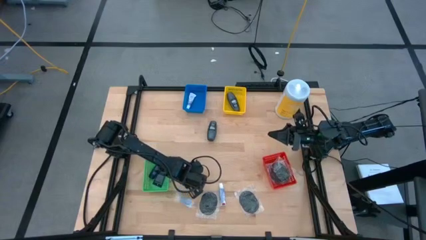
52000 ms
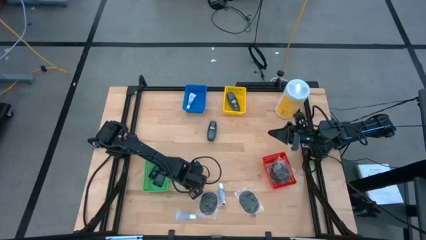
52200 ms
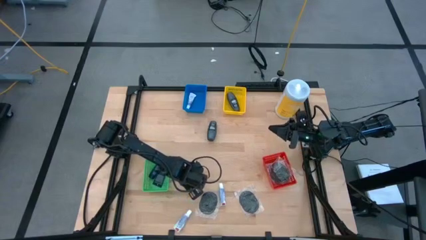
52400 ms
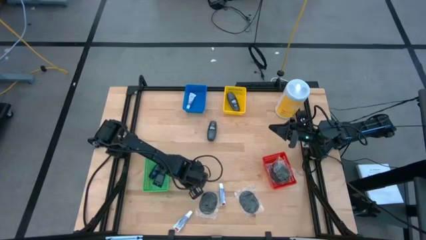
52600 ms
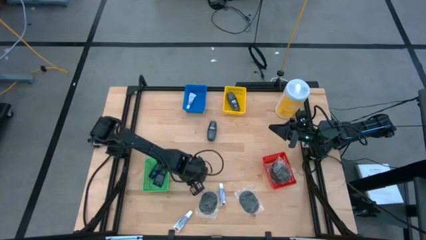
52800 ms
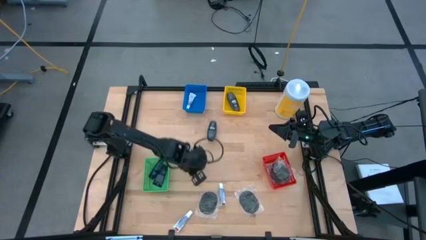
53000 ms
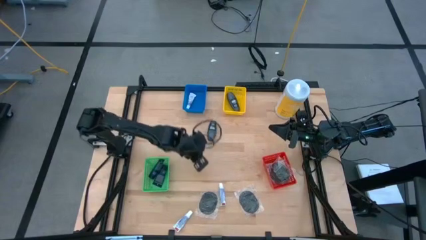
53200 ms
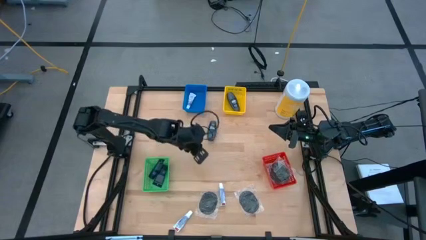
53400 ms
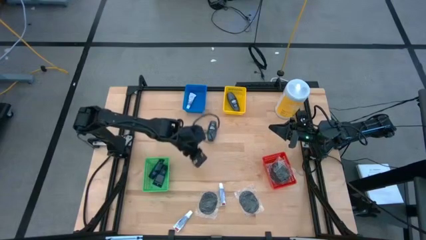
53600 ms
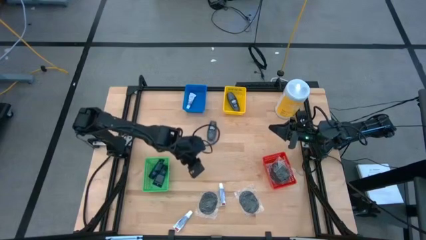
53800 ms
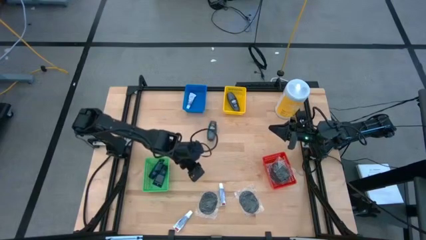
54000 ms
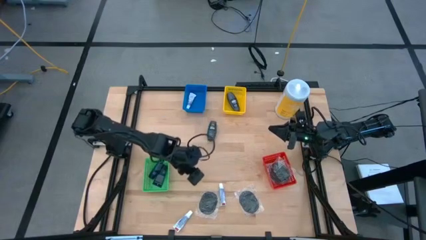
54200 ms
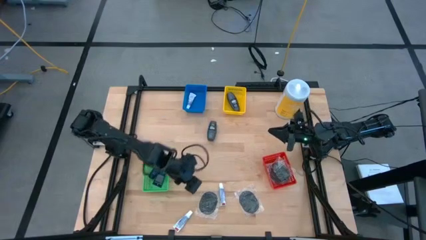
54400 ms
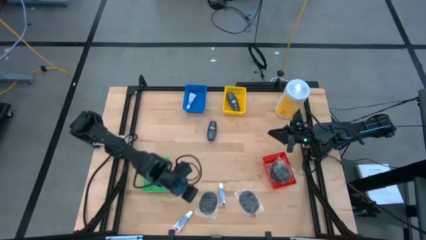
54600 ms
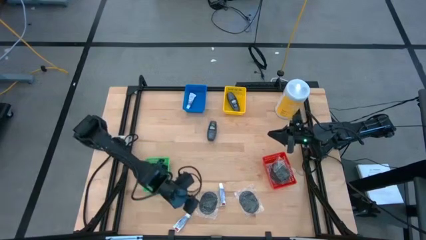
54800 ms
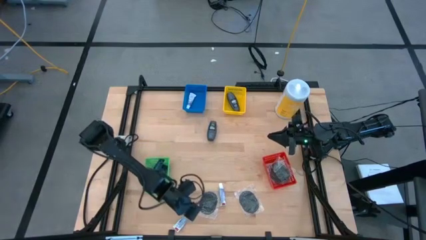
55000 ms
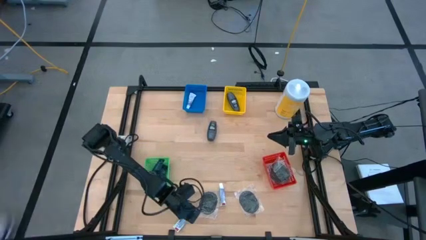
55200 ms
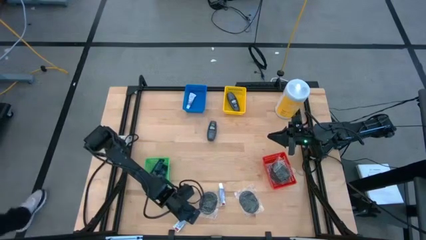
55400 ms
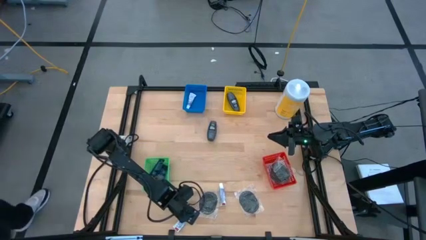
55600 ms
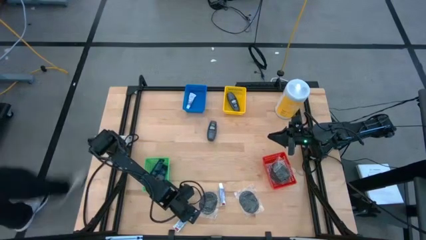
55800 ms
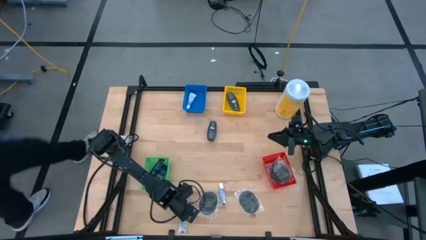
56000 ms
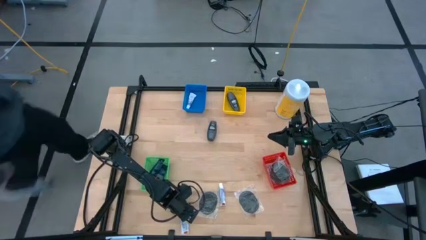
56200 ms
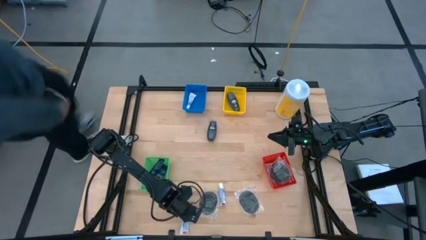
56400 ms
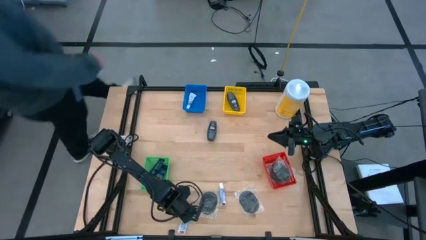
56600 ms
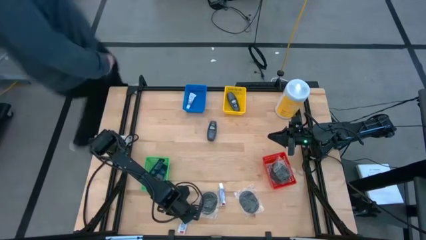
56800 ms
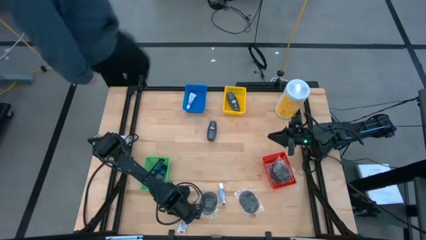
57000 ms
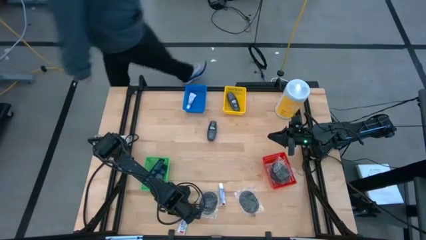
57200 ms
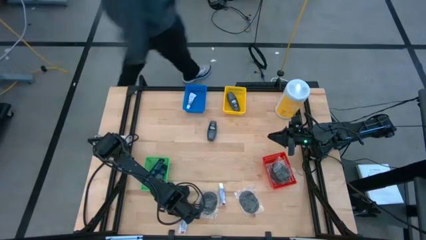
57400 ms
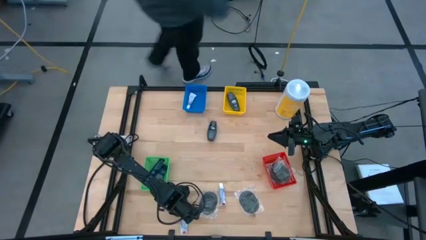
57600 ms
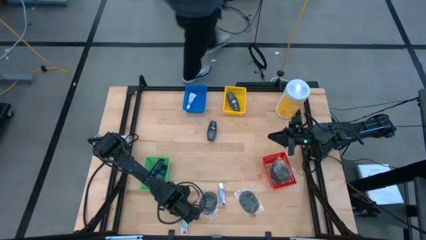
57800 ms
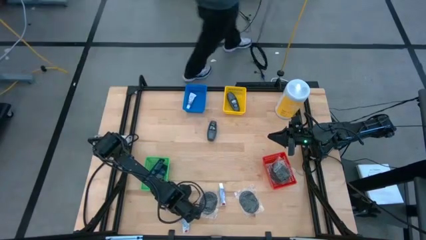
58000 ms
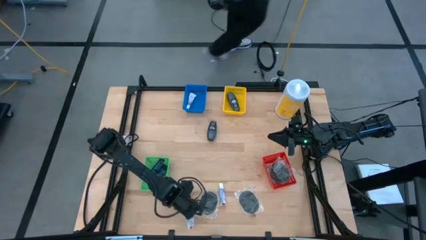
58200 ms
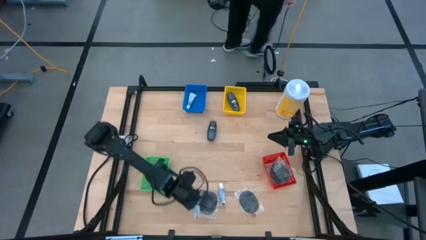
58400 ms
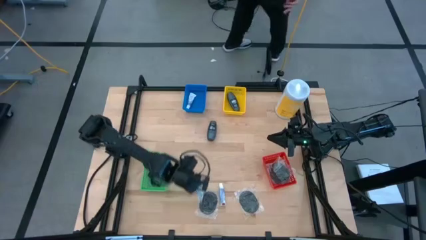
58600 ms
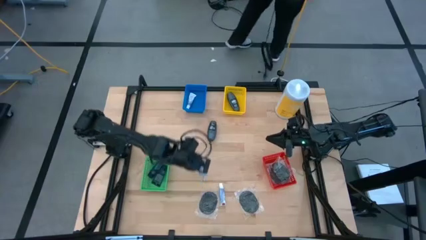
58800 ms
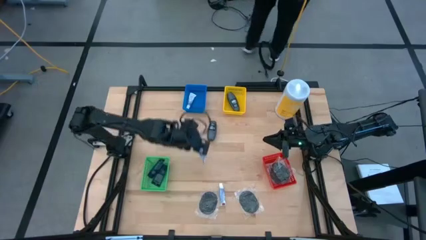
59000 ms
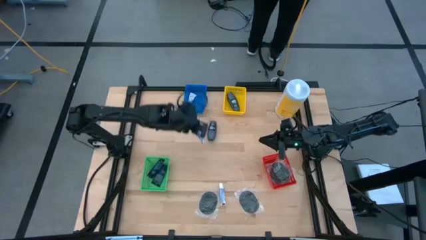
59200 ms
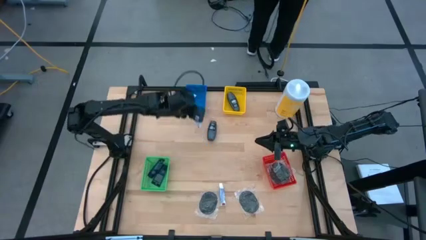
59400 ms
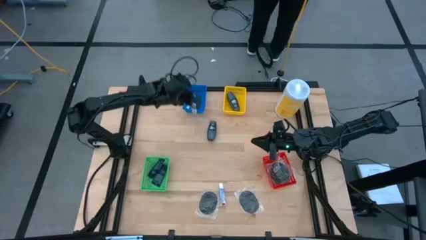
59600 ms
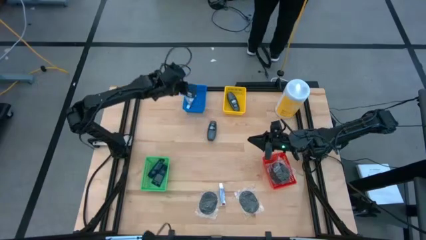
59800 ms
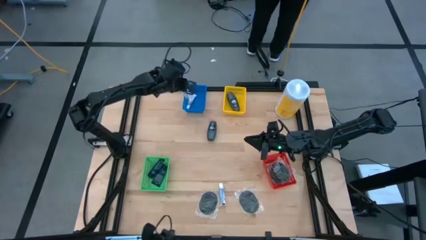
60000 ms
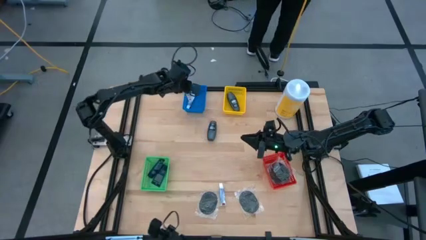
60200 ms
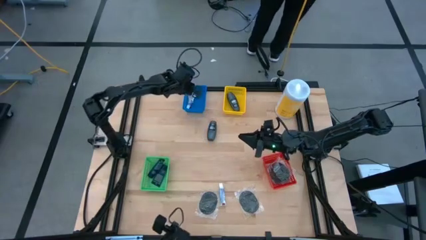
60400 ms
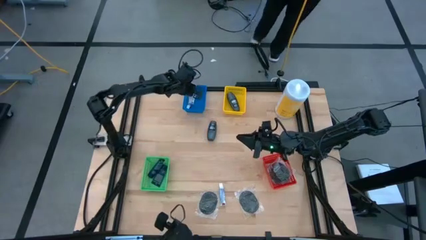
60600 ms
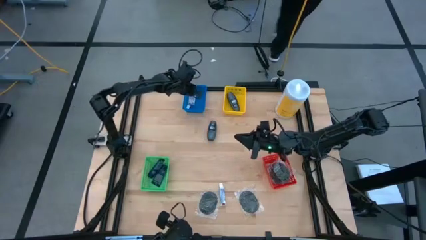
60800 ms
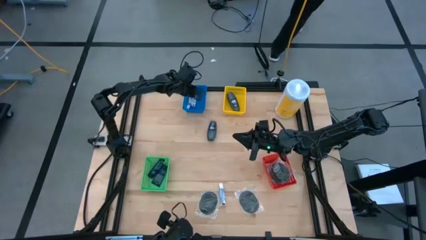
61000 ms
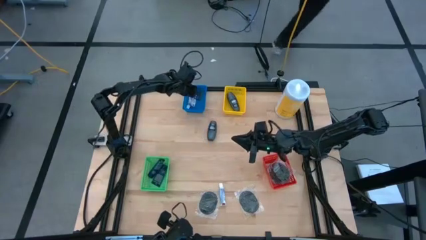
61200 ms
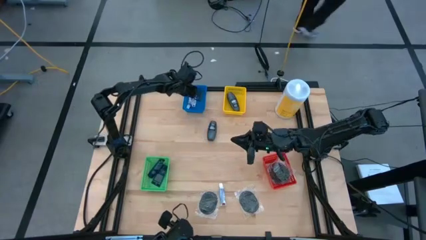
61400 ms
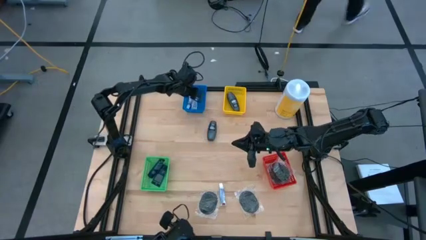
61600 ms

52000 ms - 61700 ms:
Task: Pick & Place Travel size toiletries
Put the white toothpaste into the blue basket

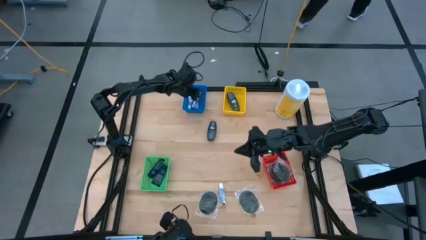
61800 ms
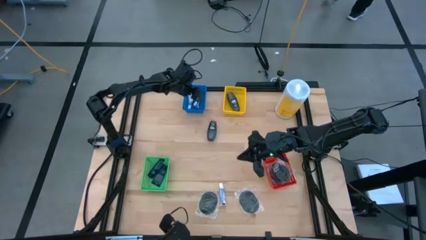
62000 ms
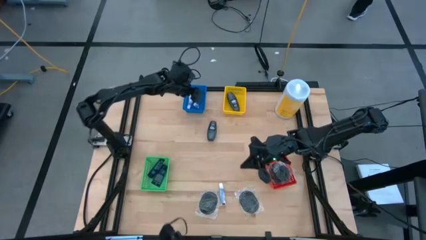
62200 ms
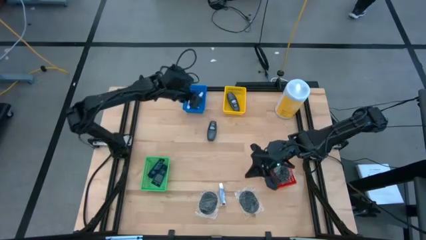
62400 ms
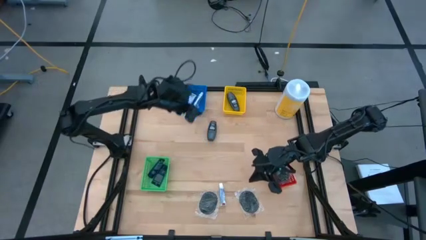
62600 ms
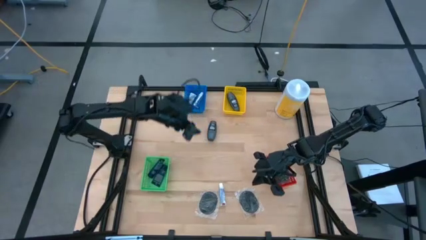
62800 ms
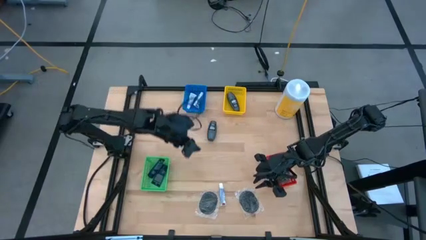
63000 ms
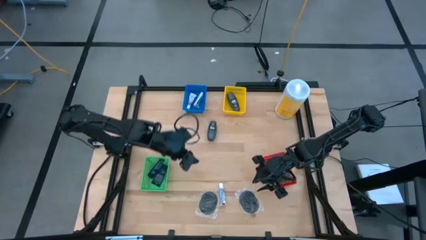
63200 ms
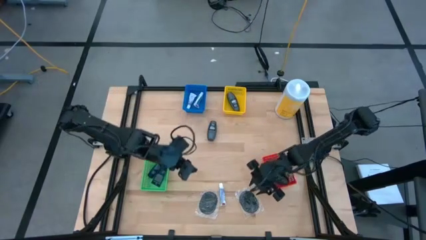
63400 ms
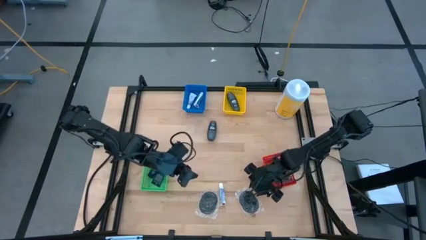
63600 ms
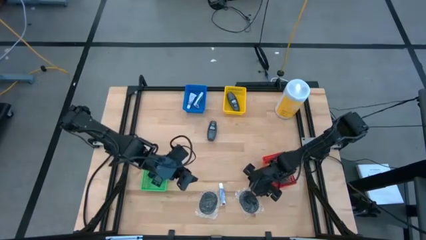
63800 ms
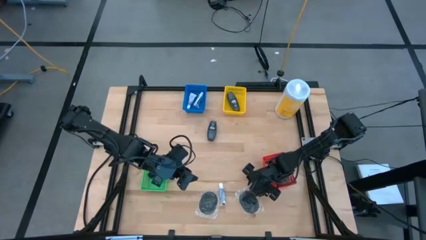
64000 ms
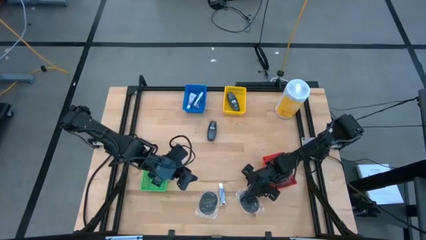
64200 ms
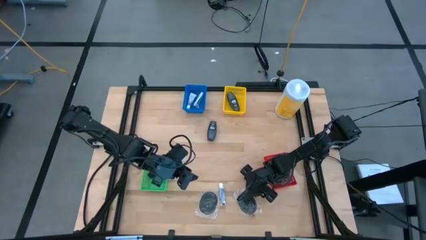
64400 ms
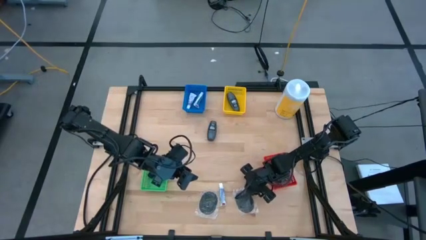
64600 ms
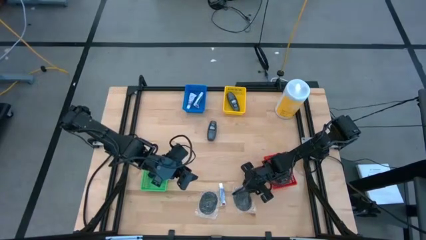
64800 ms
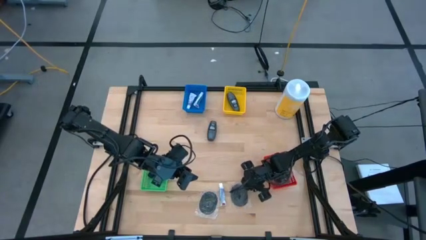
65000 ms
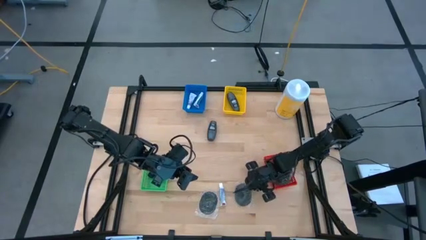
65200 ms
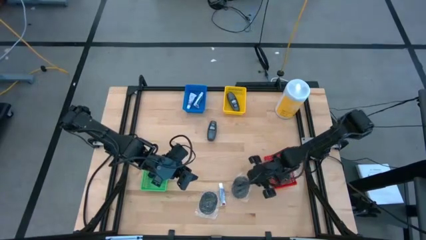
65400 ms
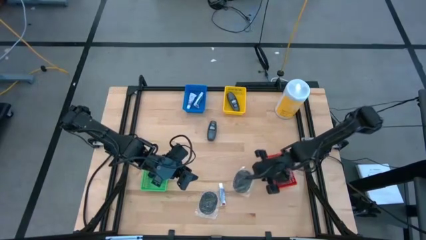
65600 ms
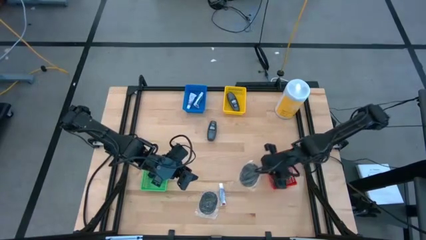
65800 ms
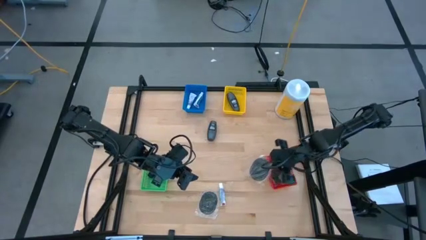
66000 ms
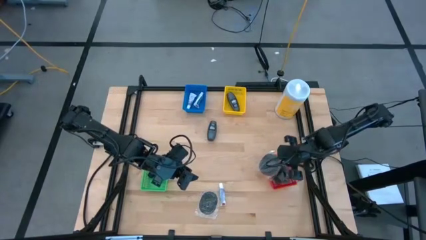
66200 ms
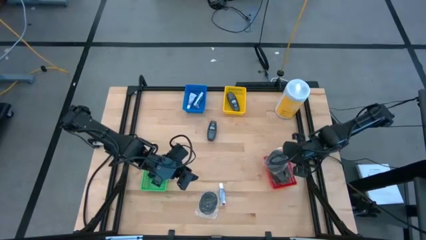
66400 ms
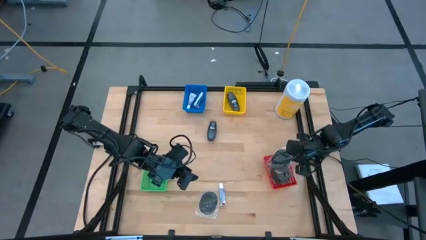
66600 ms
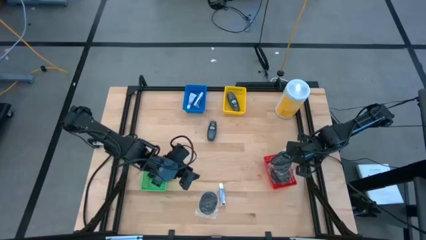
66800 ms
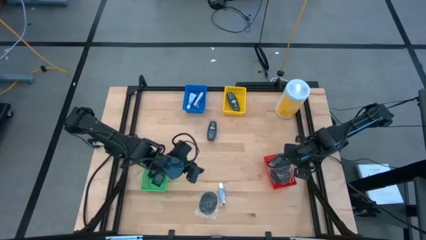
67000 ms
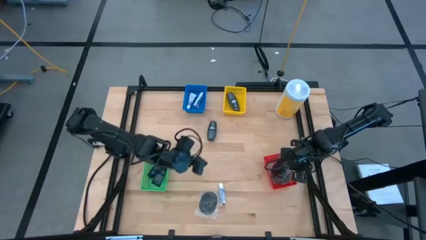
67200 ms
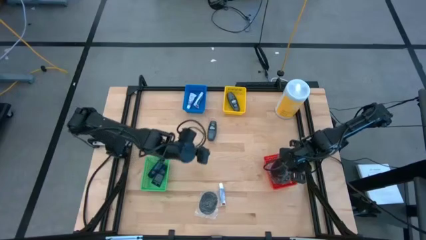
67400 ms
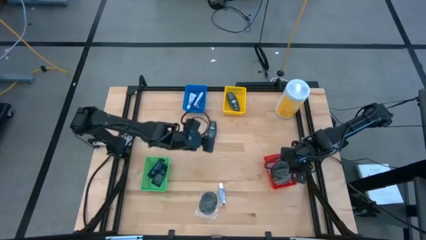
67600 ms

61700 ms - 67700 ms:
Put the black hairbrush into the red basket

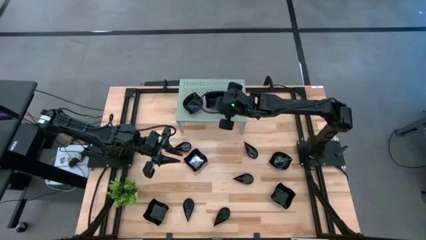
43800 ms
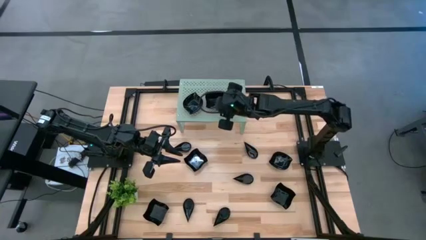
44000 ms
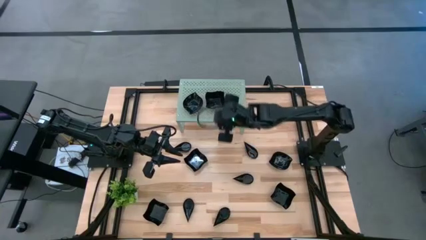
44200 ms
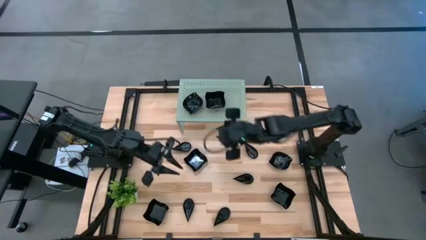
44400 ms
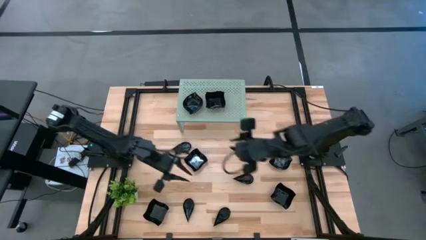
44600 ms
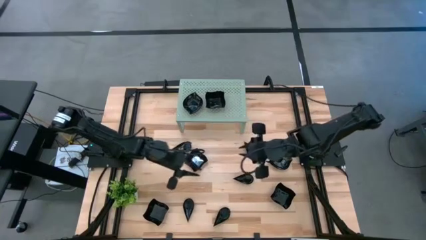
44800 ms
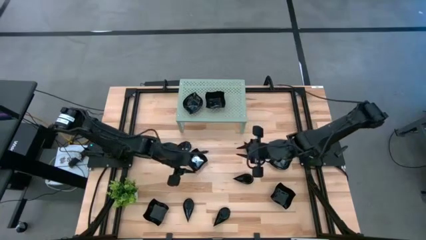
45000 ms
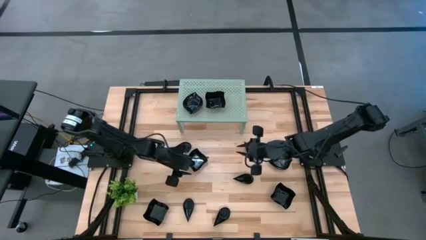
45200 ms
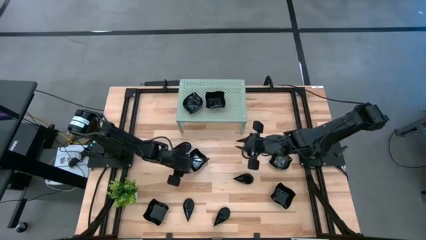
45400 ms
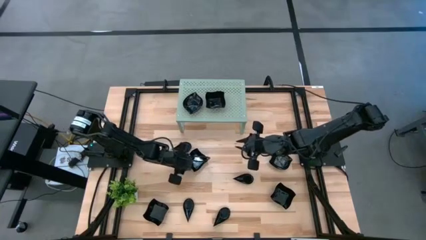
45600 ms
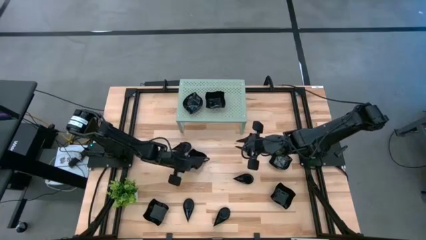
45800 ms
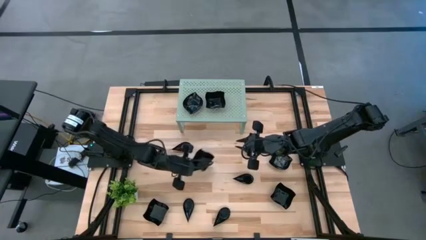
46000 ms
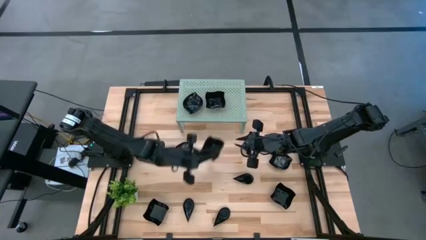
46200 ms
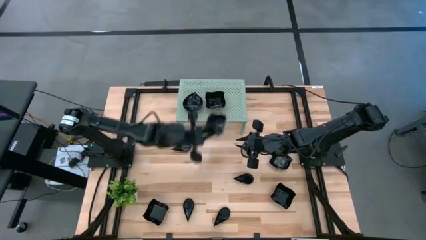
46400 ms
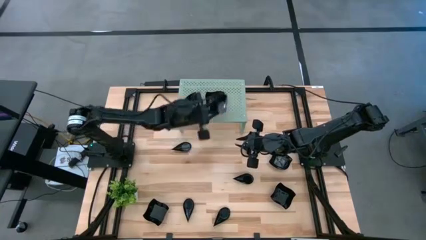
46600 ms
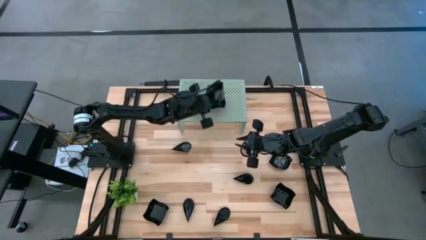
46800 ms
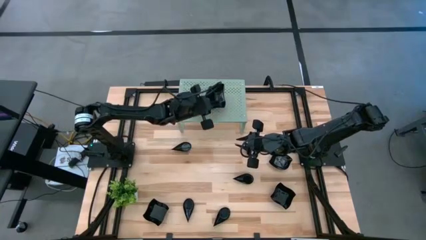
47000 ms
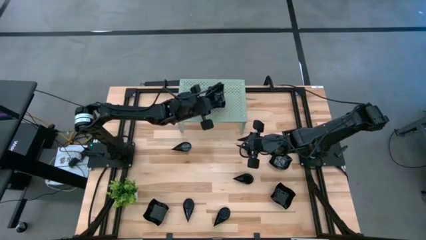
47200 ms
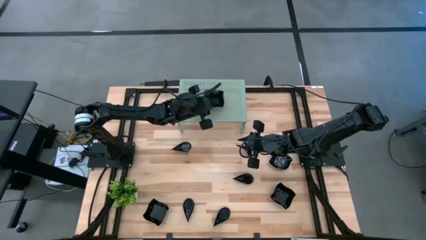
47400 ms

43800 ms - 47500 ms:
Task: Pick & Place Mini shaped plates
Stack the distorted square plate on top of the other distorted square plate on the shelf
